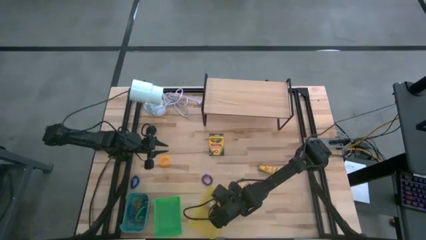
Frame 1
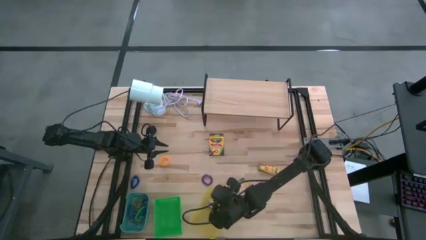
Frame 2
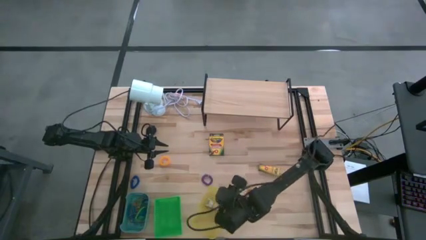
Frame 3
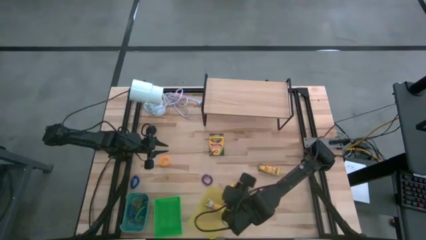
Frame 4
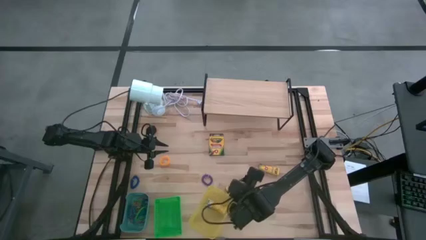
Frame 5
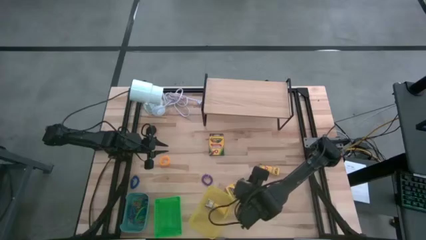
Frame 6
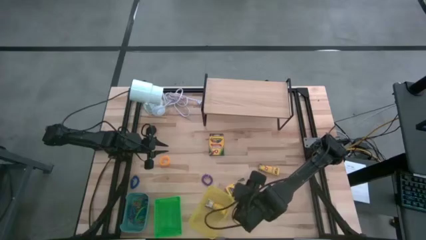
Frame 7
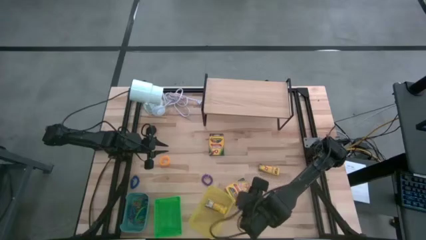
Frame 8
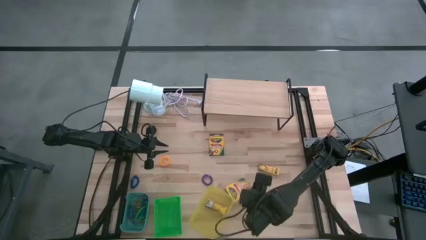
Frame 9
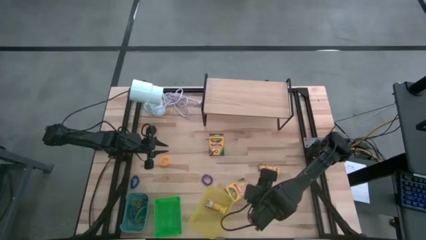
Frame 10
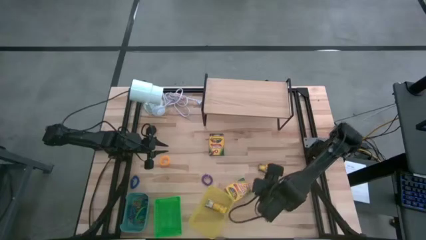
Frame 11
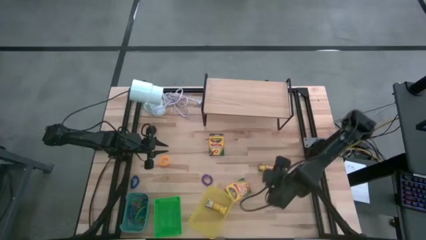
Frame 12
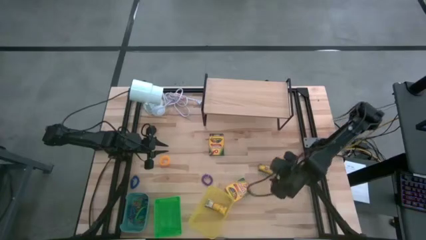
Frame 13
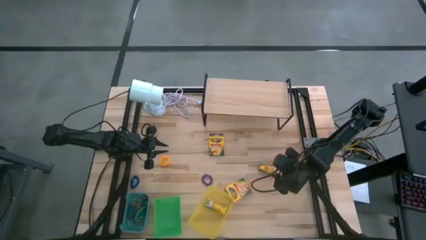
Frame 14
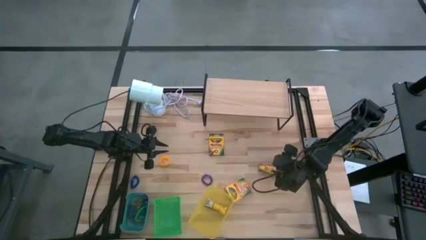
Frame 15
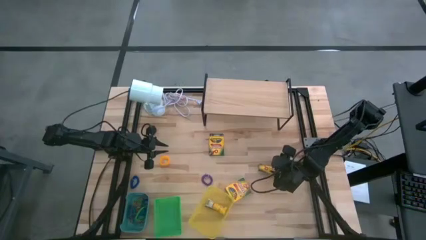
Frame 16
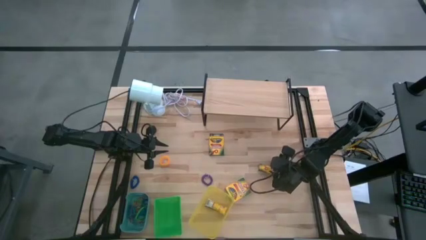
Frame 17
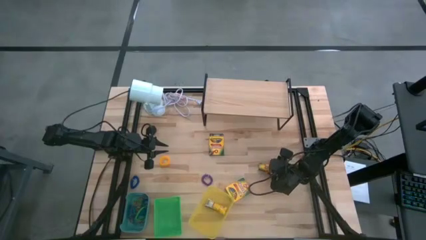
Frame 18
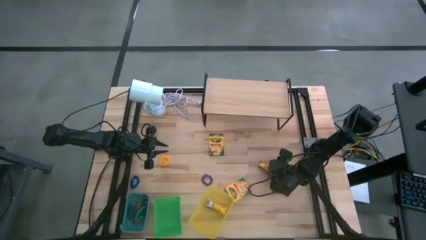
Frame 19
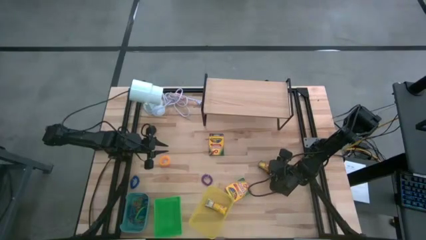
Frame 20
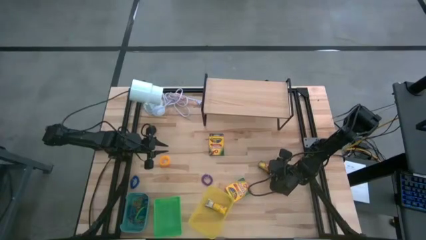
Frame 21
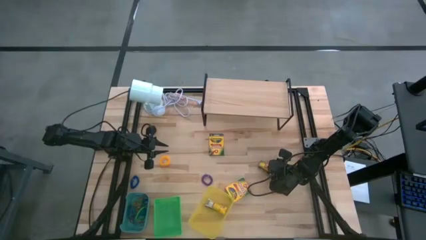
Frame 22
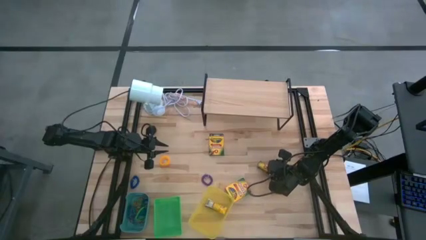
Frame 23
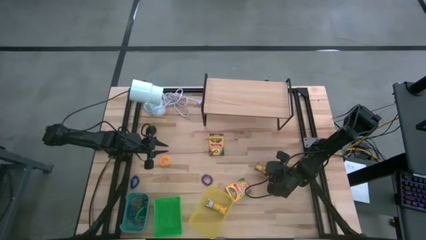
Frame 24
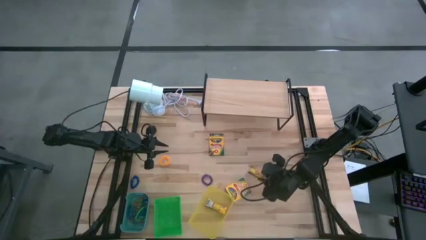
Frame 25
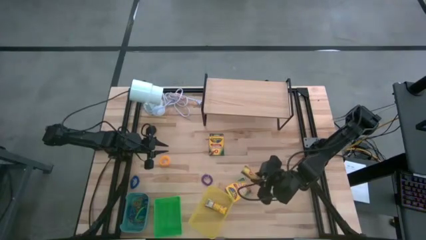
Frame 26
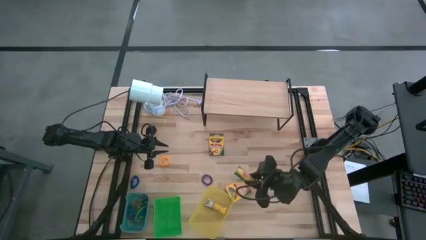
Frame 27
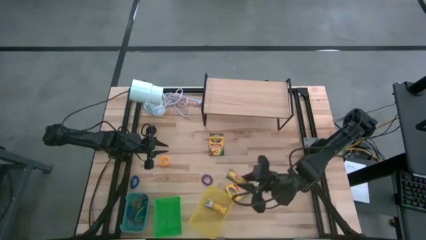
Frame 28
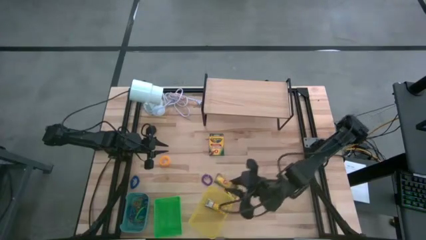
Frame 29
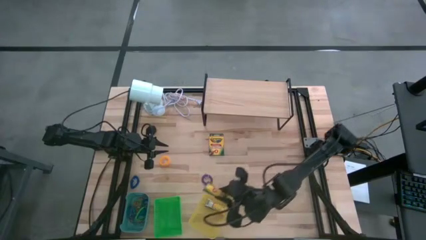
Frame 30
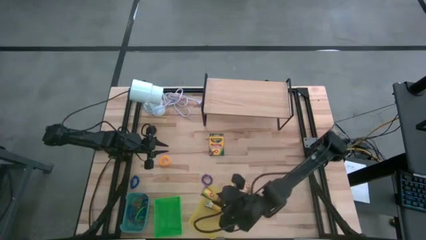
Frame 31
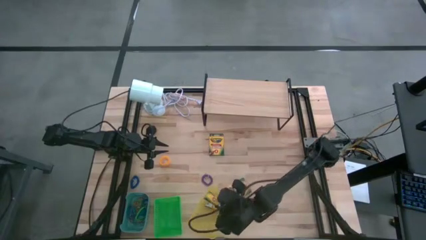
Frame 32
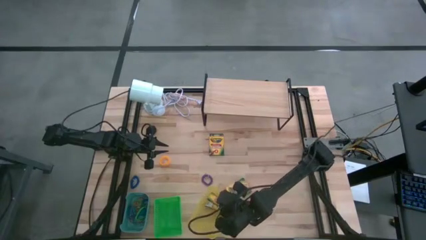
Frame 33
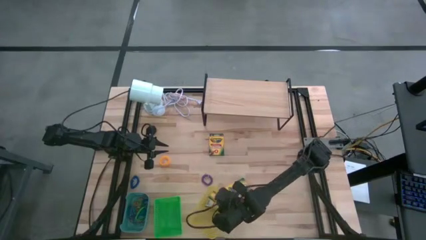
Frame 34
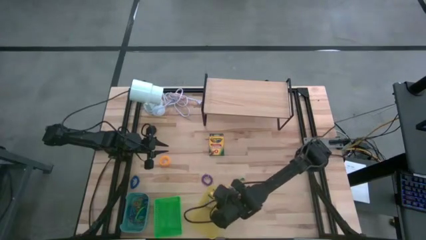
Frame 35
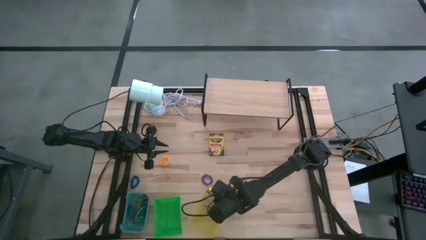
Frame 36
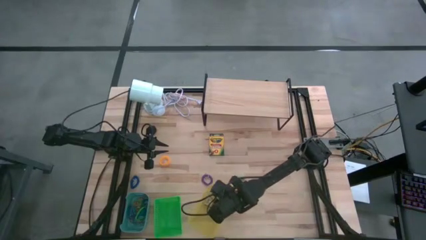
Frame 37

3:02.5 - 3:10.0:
Task: Pick & Place Office Desk Supplies
Put the crayon box into the yellow bin

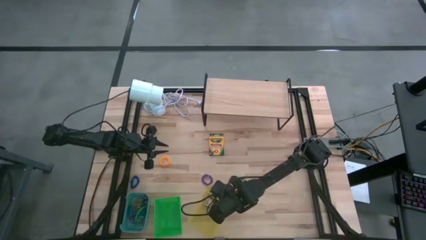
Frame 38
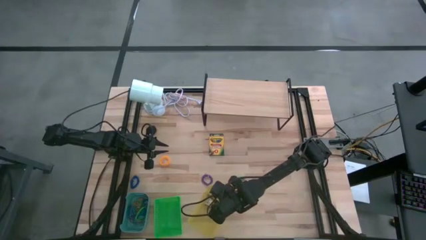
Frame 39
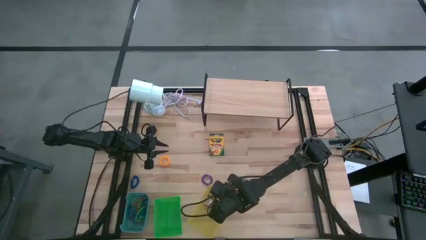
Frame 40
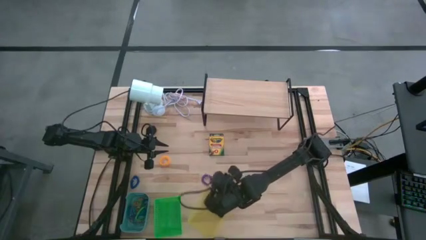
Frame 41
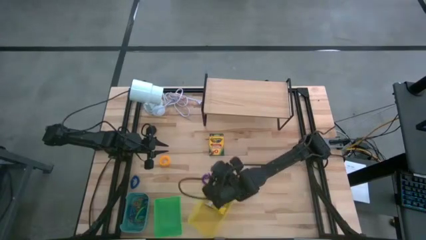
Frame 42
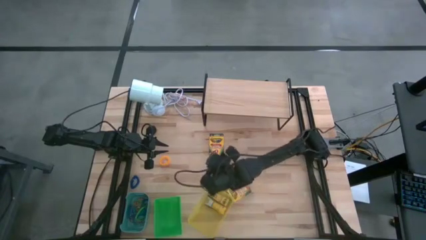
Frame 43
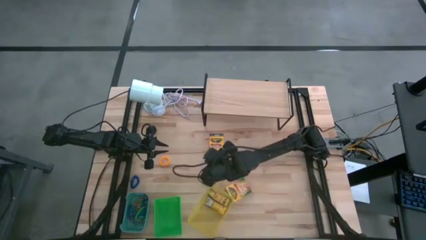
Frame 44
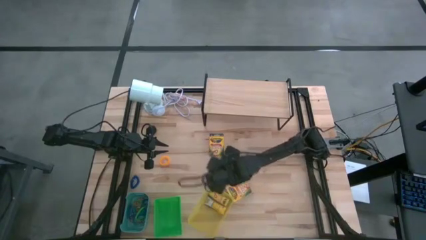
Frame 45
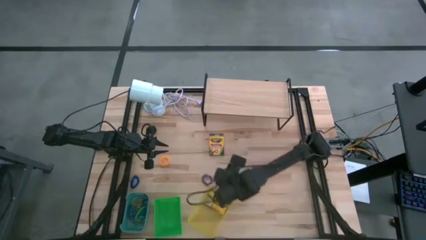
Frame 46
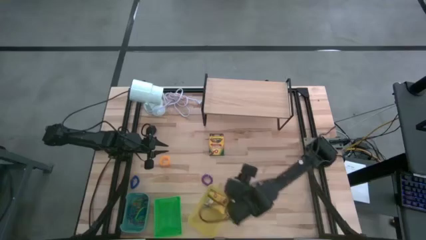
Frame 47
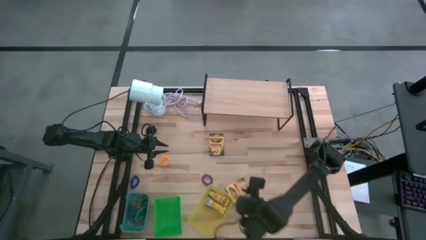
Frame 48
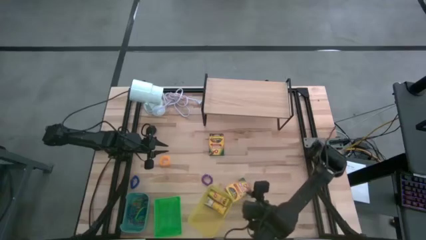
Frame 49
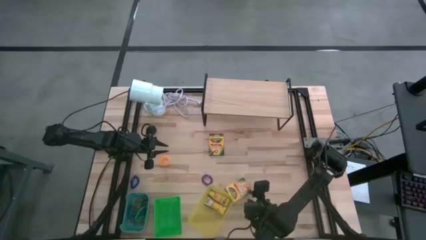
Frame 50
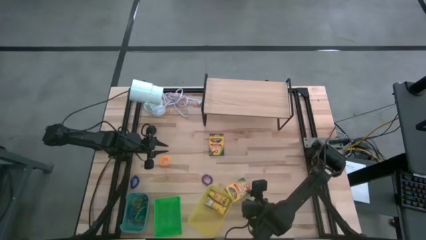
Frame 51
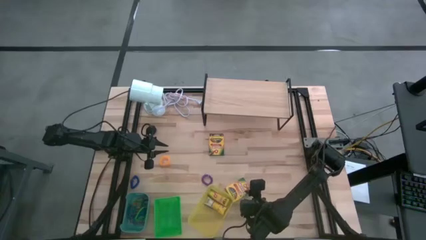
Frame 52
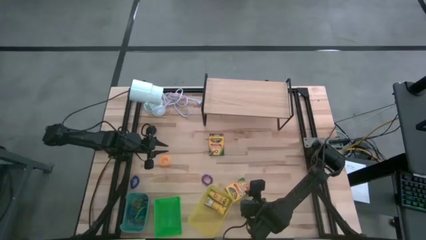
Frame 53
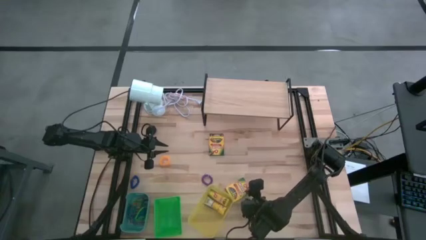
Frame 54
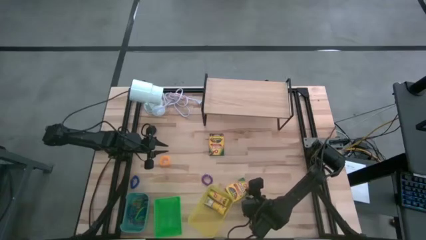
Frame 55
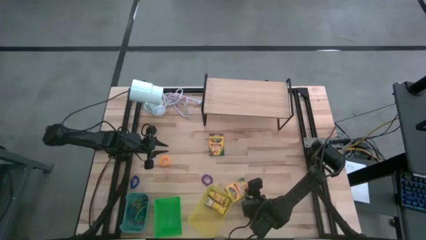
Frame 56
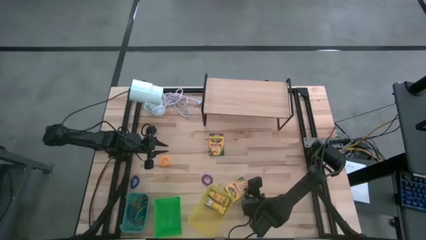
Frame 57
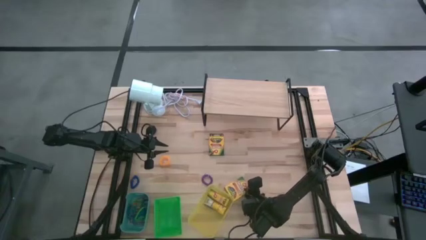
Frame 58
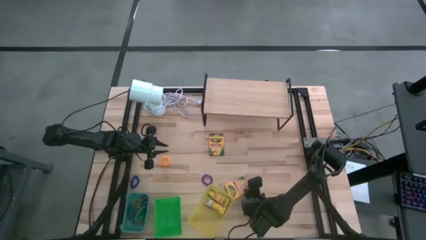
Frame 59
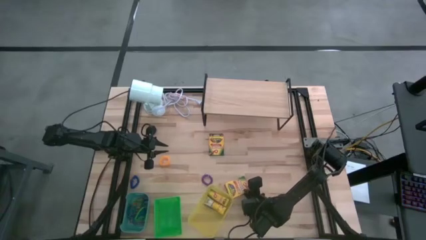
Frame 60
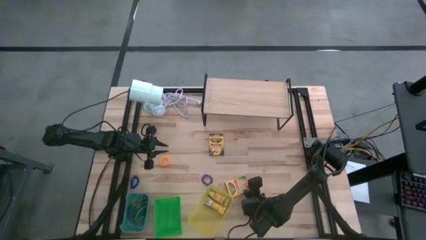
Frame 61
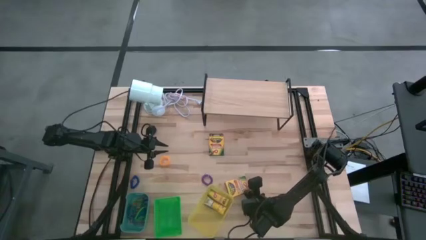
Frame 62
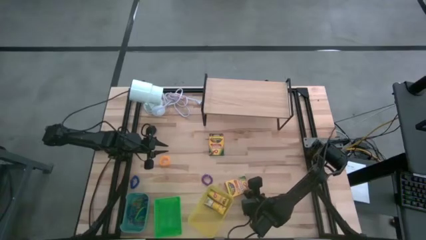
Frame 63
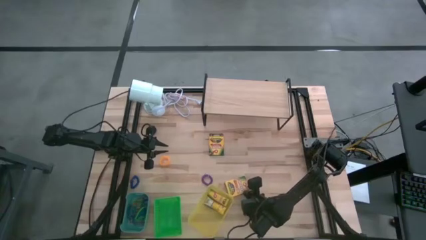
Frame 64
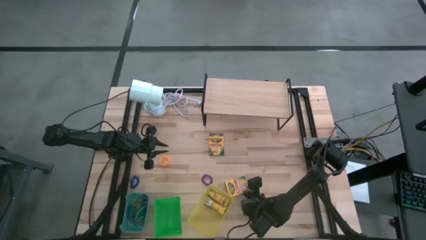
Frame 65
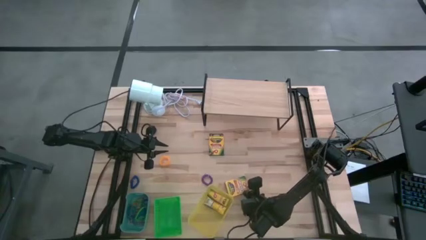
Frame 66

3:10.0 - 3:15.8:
Put the crayon box into the yellow bin
